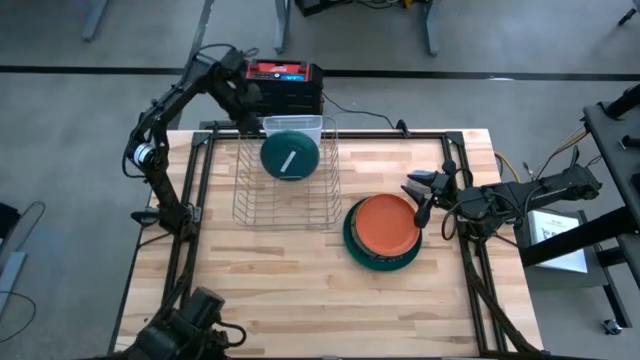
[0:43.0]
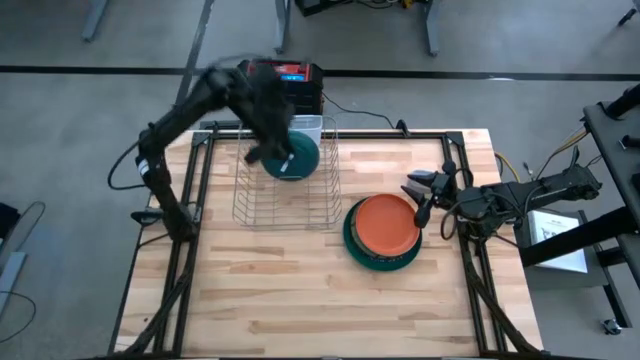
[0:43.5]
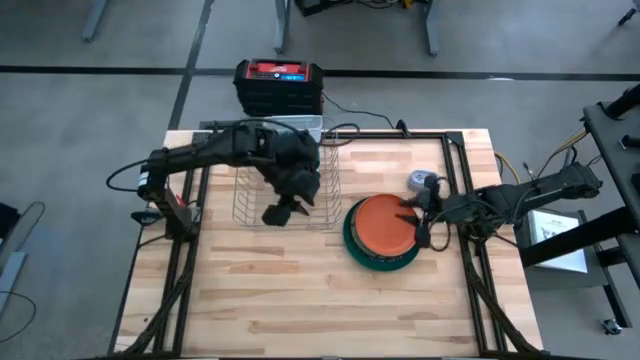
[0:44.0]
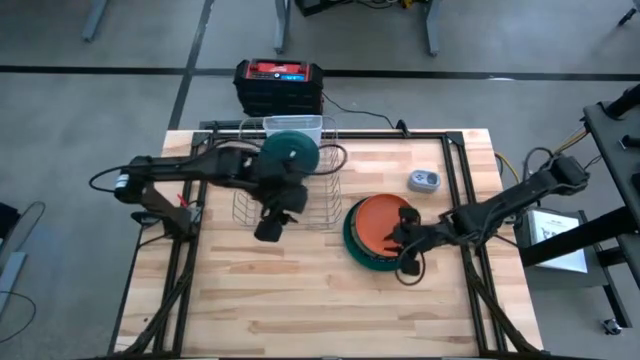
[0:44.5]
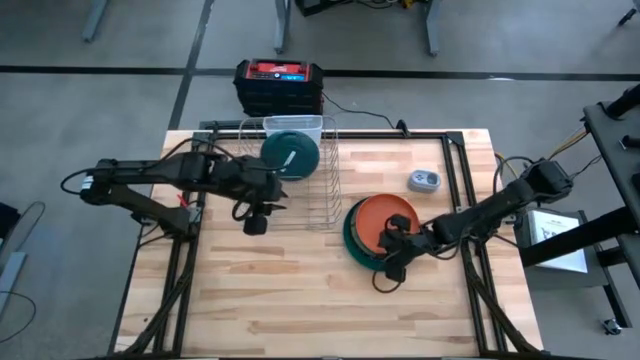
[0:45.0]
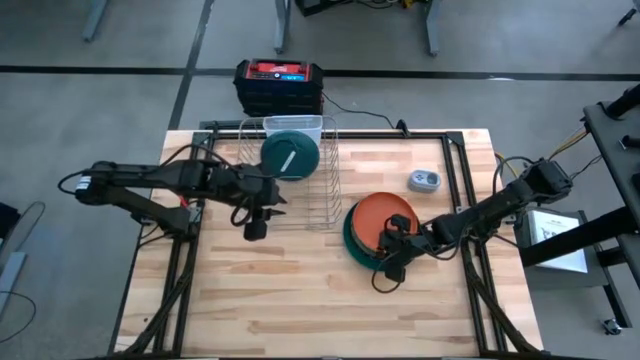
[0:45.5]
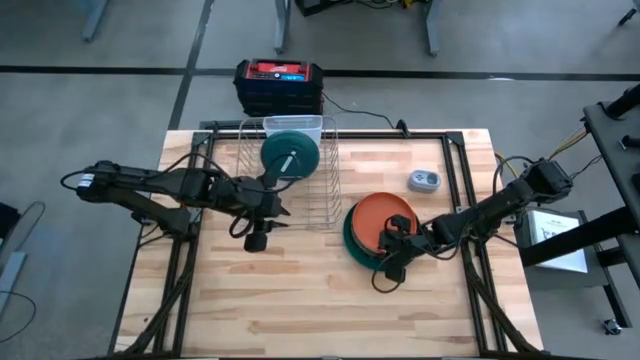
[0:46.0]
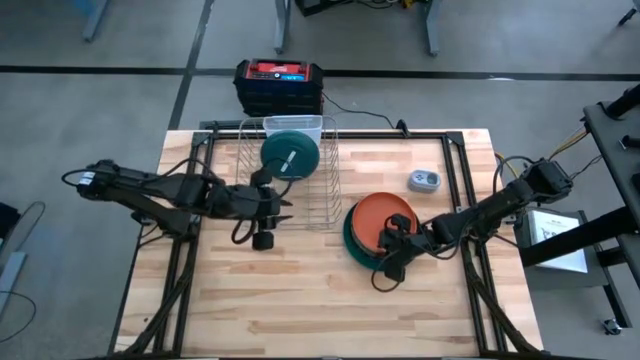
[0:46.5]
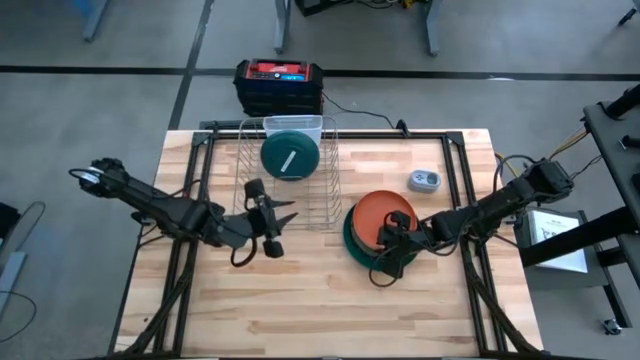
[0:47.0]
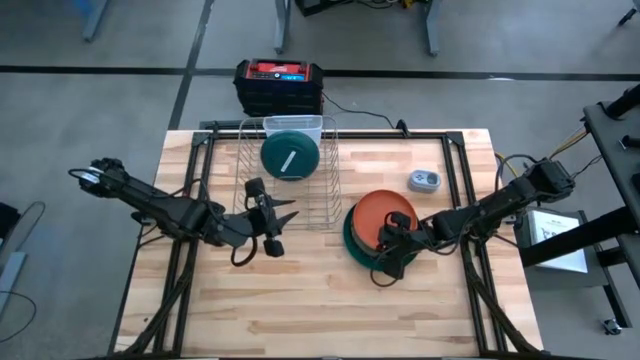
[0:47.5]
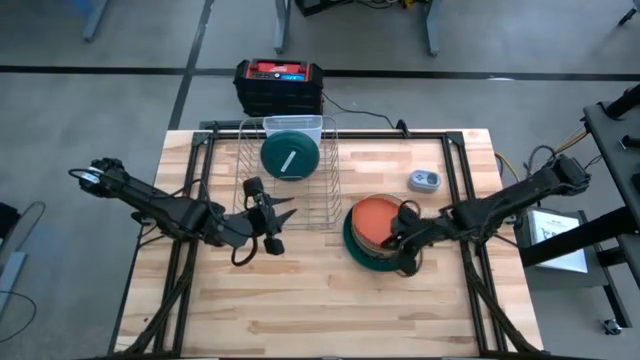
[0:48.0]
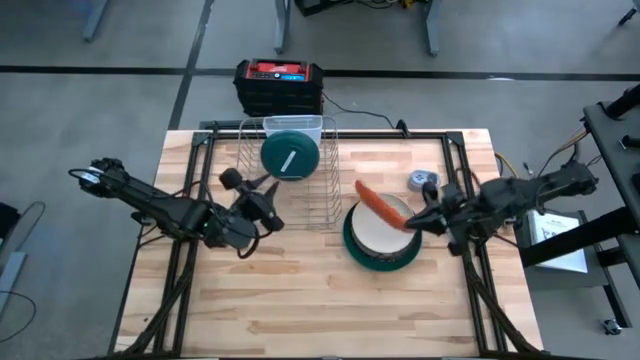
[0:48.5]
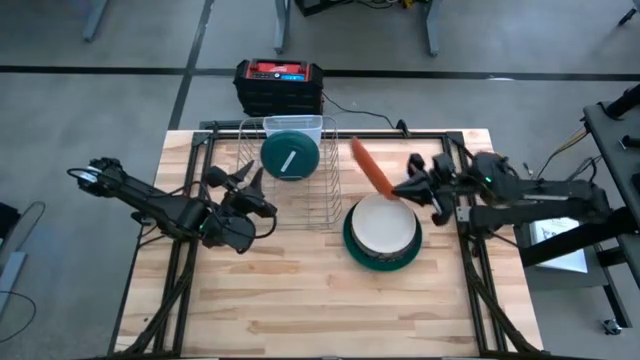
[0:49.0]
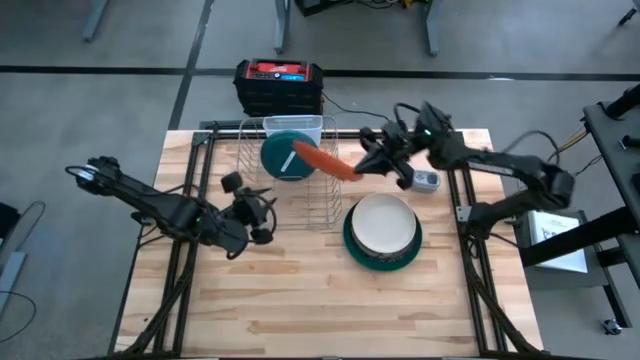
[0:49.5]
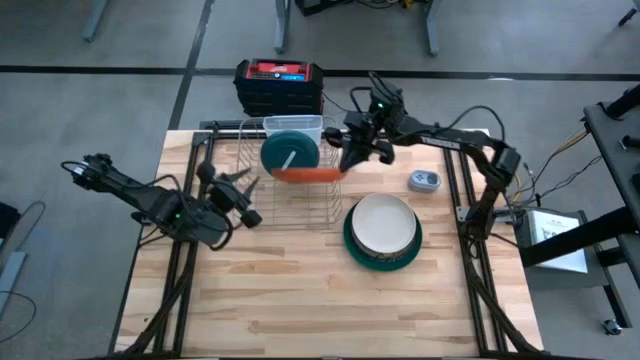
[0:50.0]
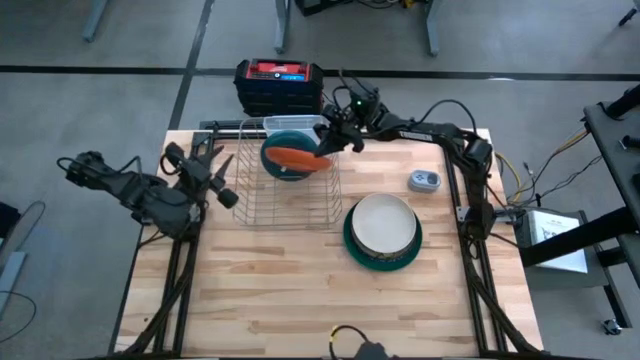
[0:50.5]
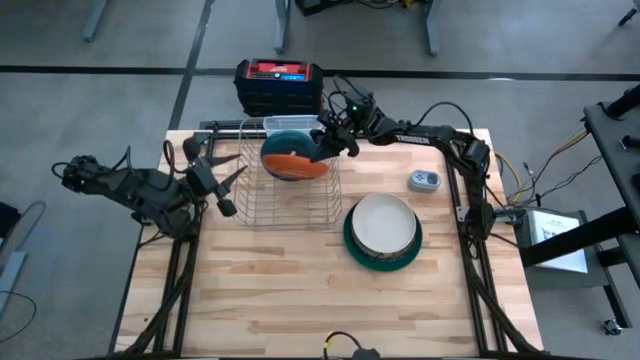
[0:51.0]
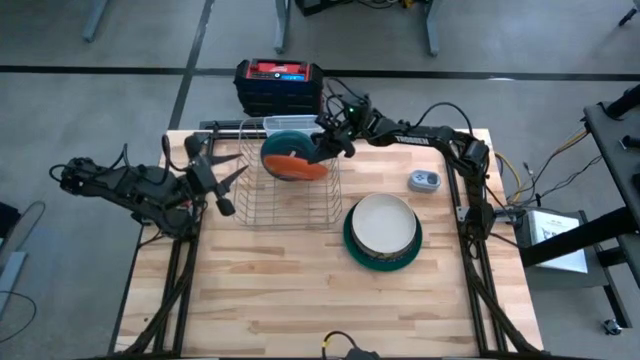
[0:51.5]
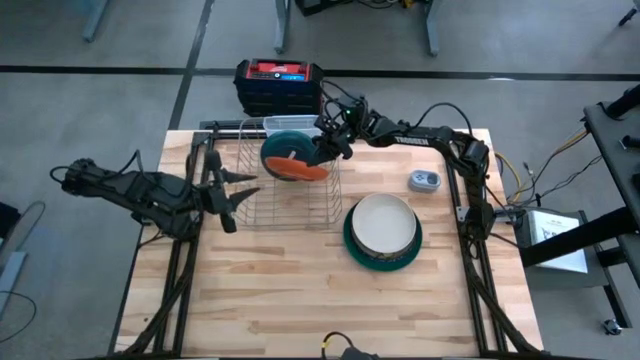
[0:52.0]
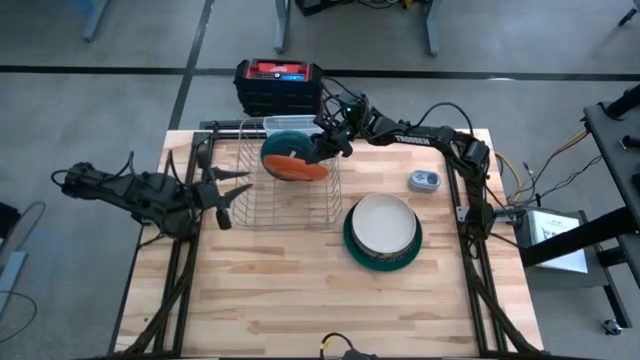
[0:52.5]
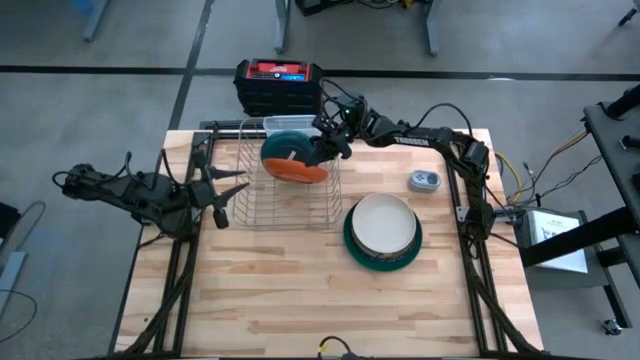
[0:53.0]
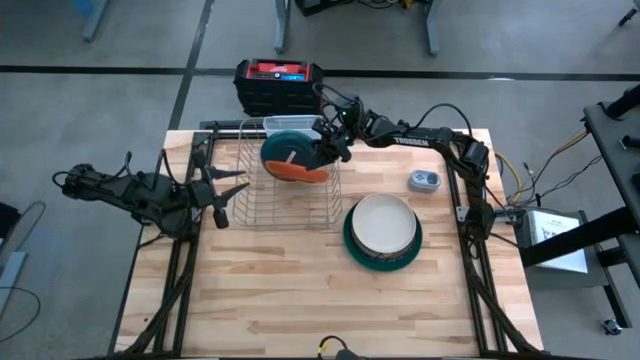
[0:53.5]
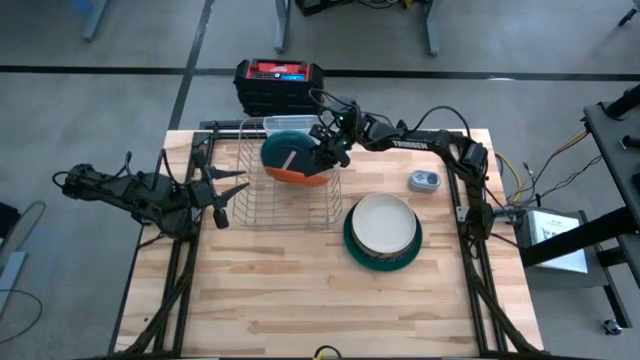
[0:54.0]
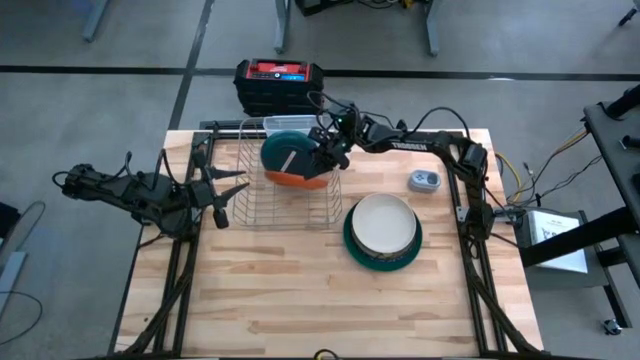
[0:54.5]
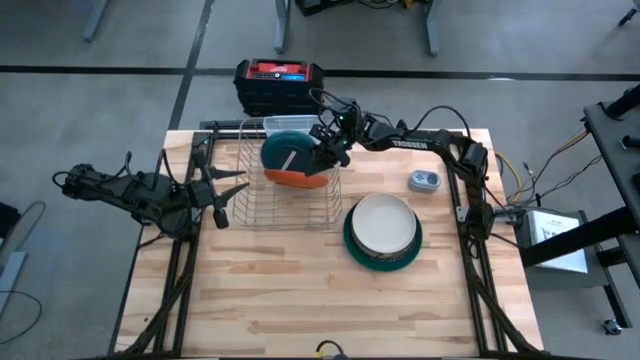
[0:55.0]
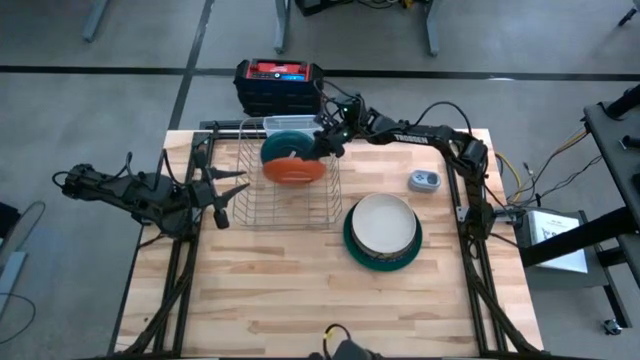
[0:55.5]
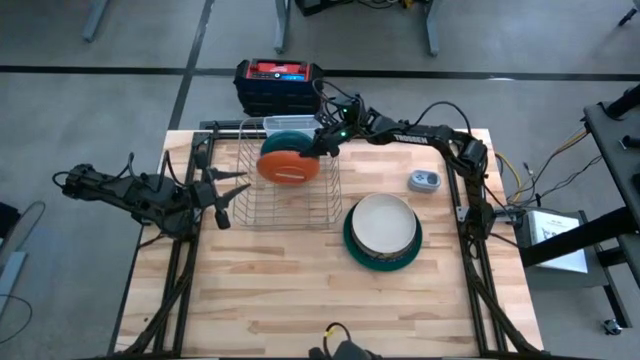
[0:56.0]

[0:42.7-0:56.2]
Task: Sort dishes
Put the orange plate into the dish rack

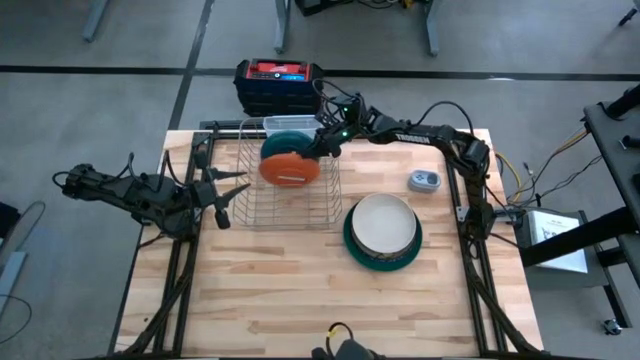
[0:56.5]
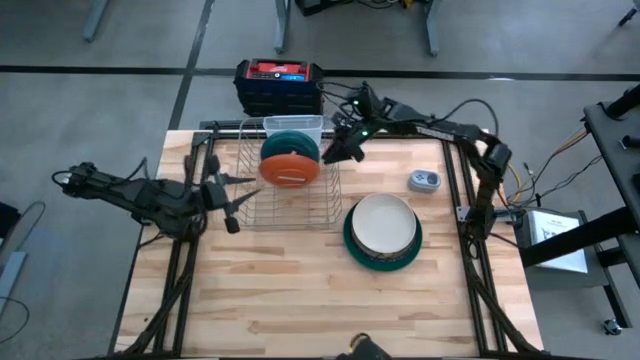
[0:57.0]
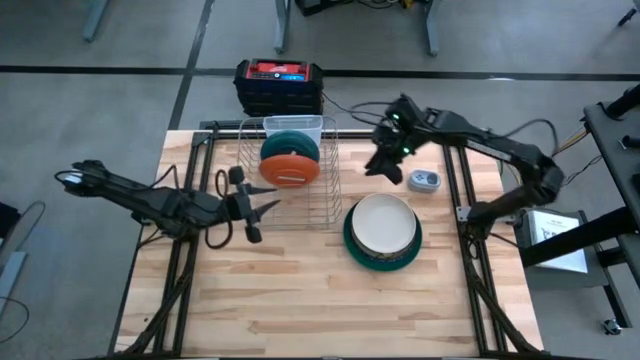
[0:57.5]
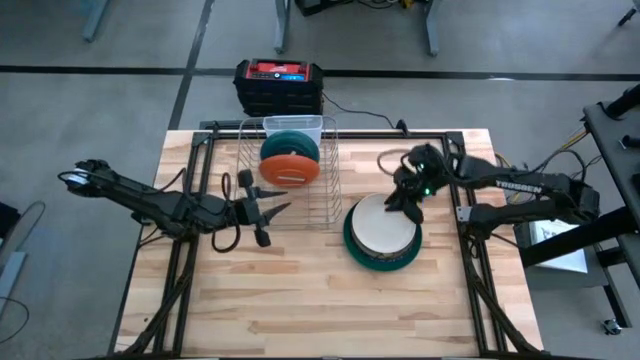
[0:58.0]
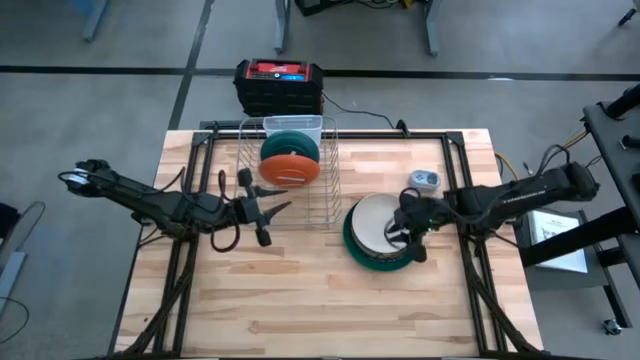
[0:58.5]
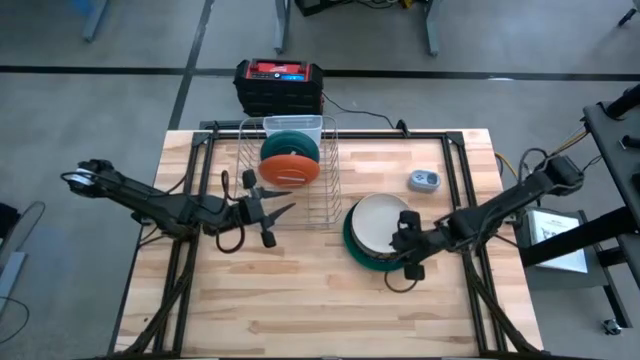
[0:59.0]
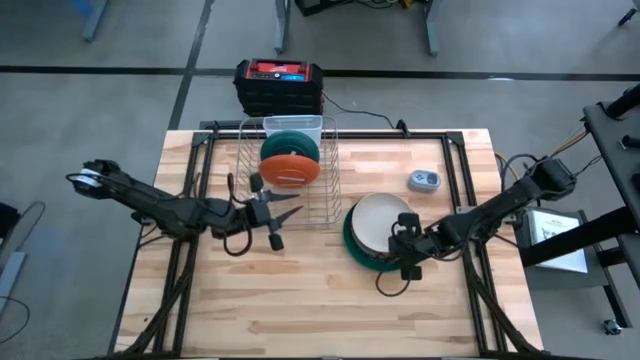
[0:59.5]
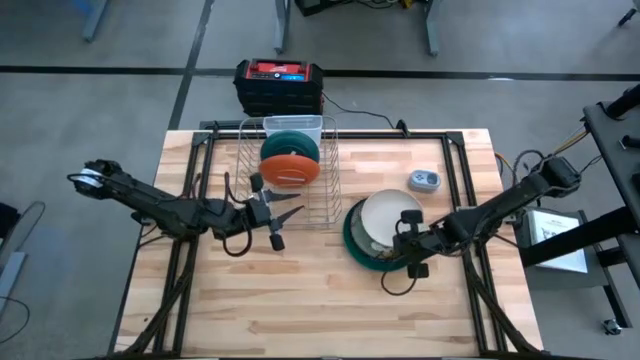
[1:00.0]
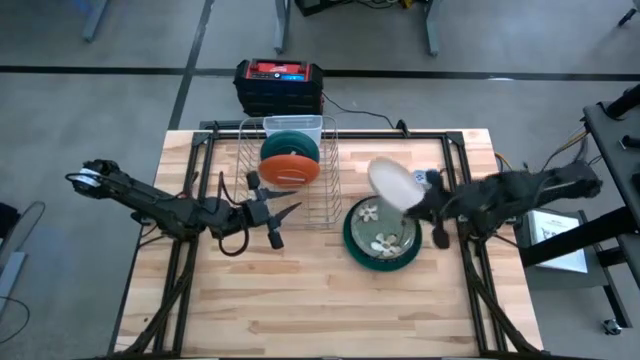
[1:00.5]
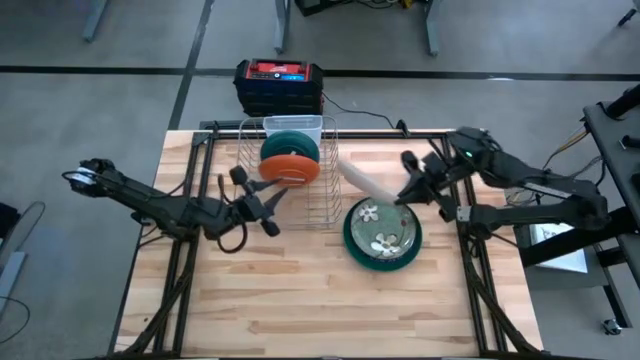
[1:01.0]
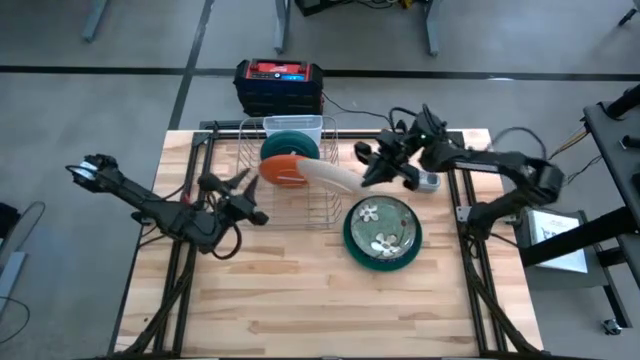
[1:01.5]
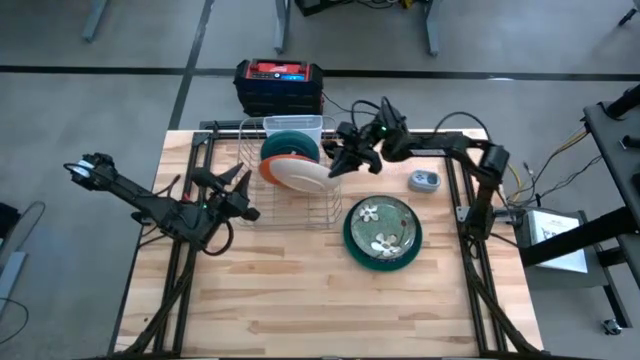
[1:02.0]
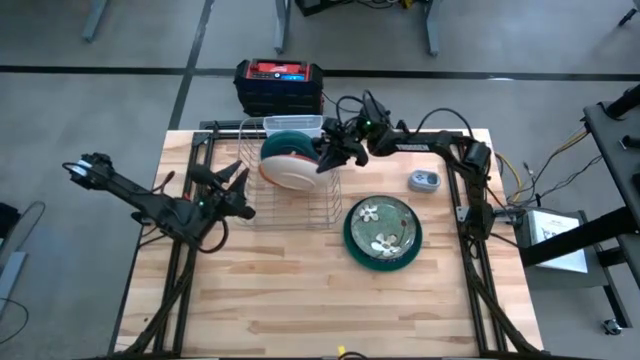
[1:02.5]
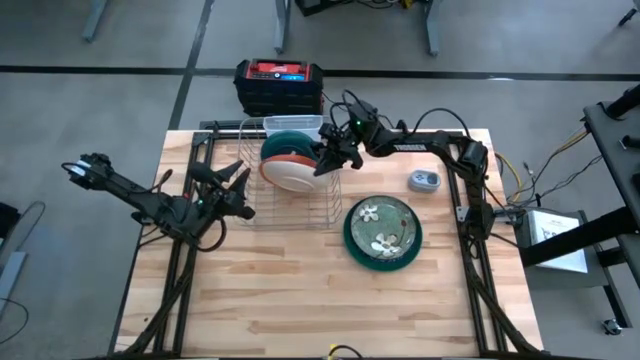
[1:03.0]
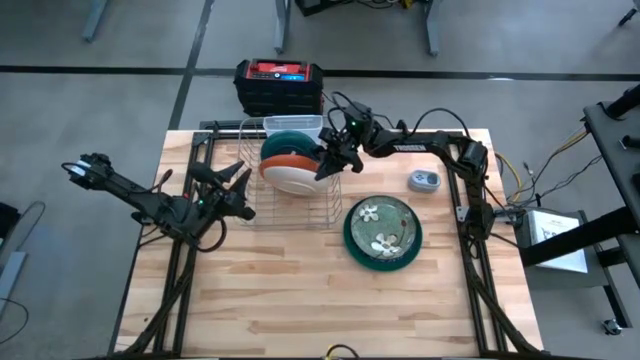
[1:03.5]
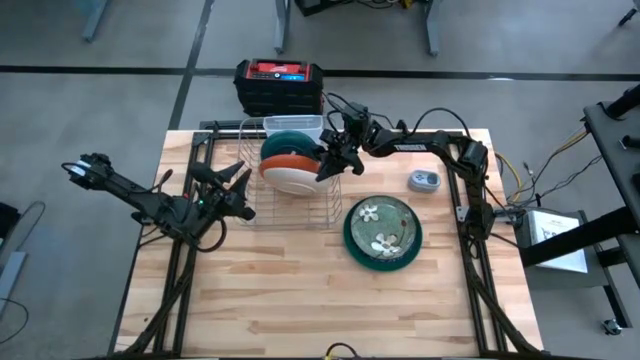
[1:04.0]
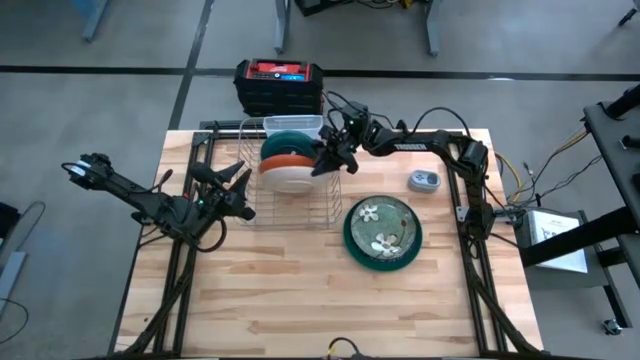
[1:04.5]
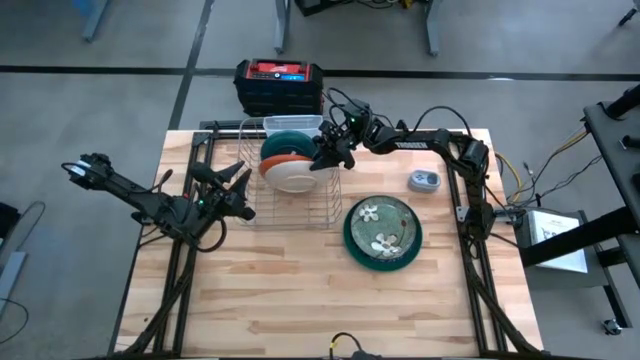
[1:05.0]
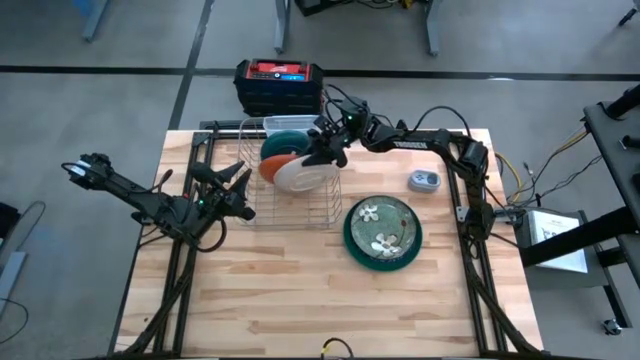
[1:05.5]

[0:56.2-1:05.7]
Put the white plate into the dish rack
